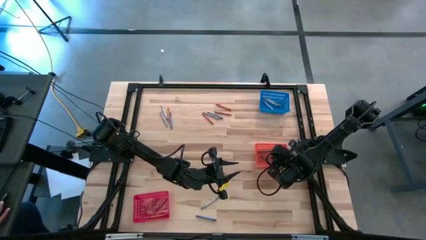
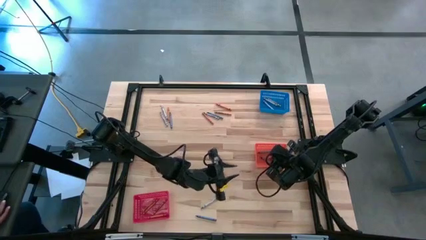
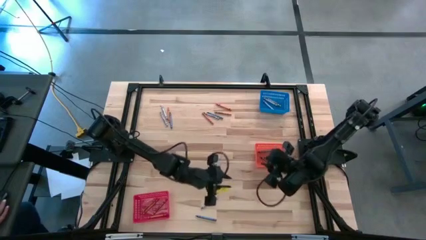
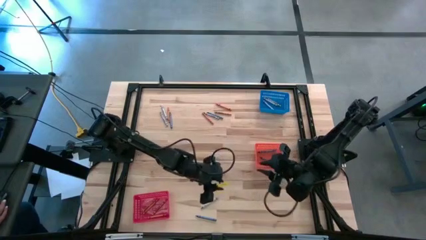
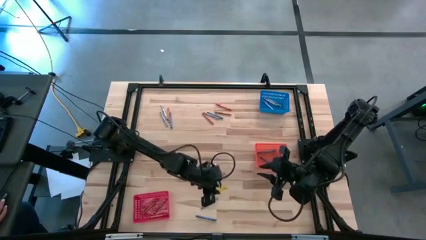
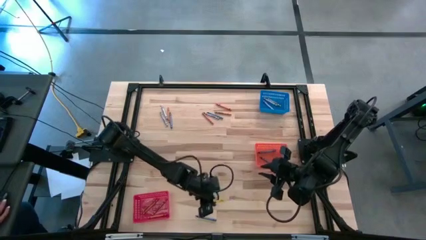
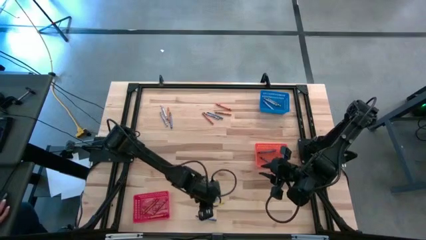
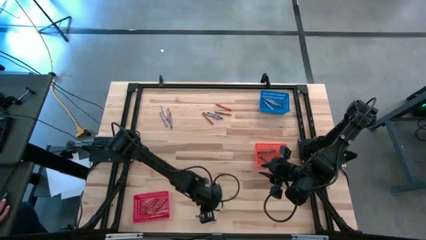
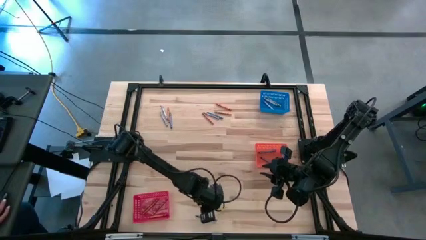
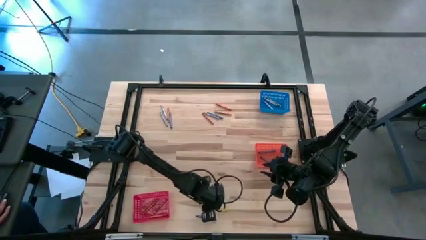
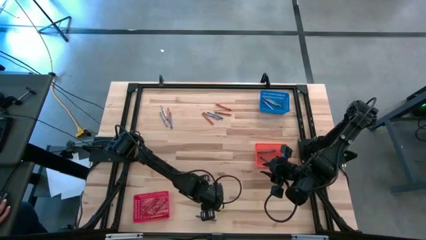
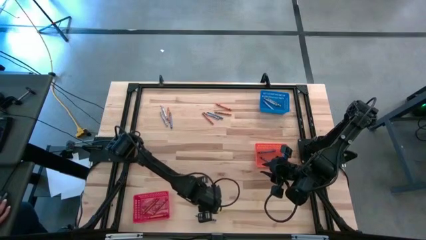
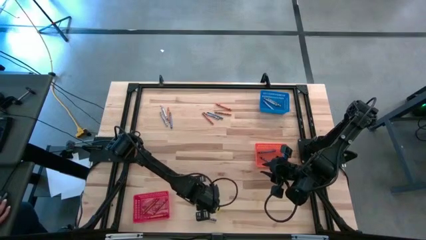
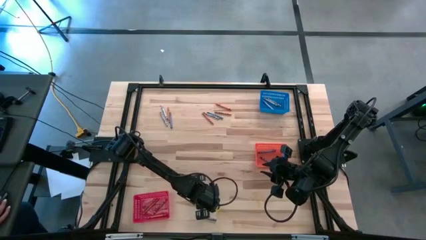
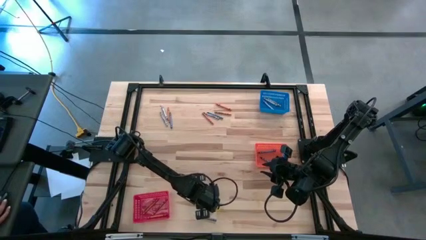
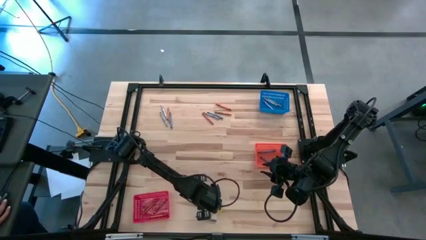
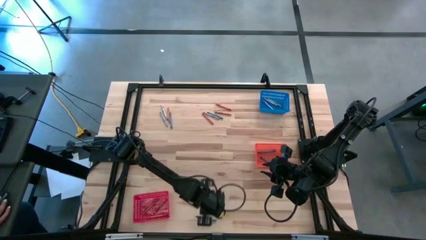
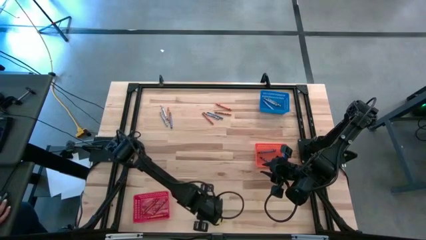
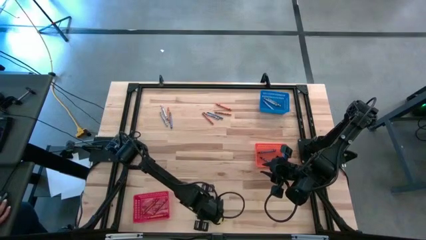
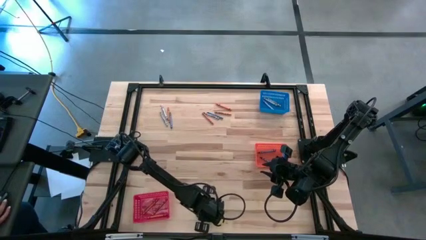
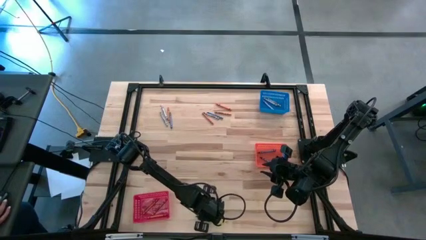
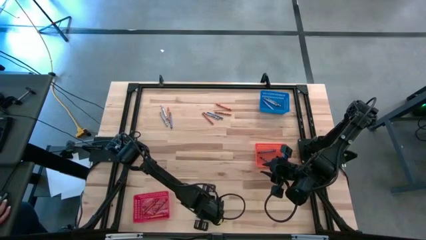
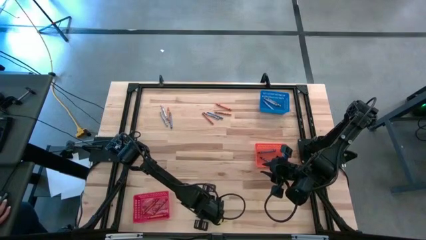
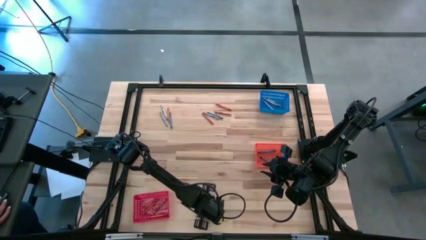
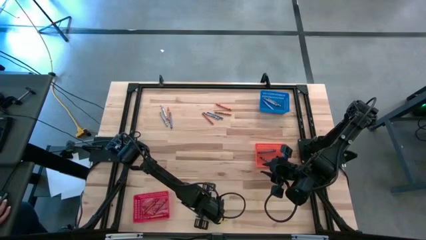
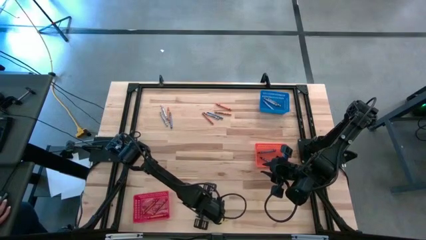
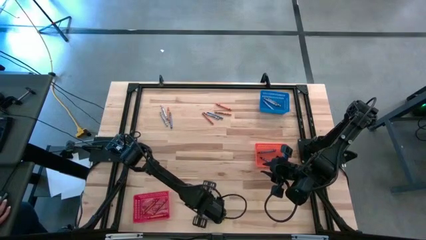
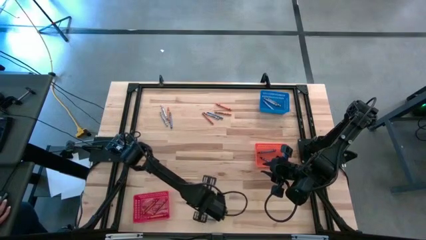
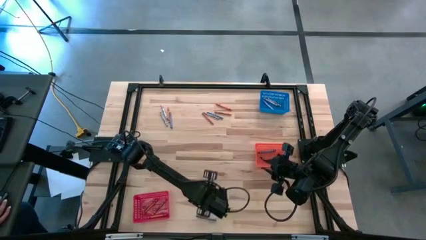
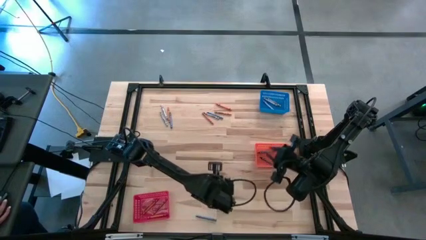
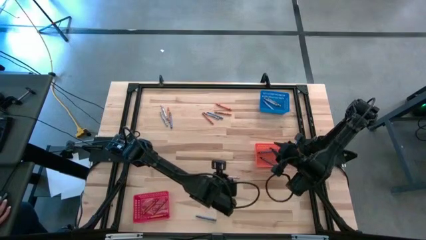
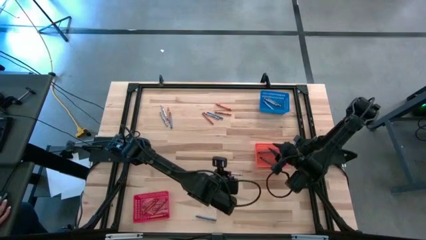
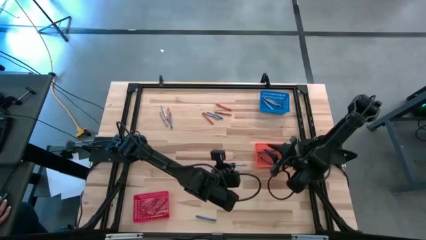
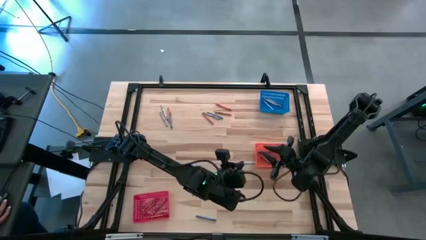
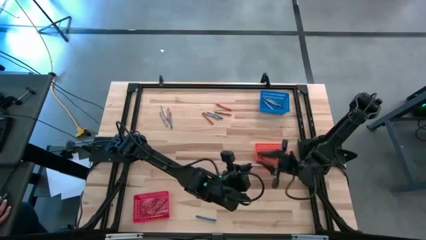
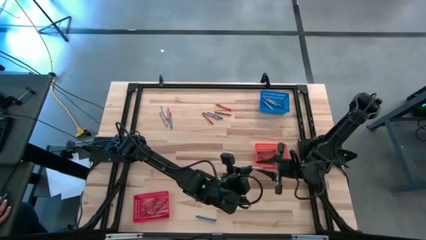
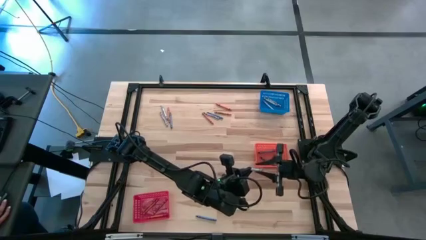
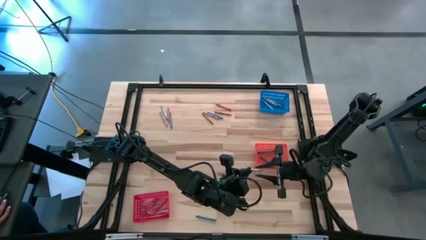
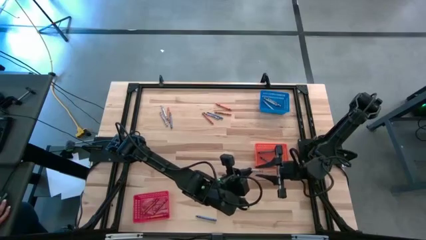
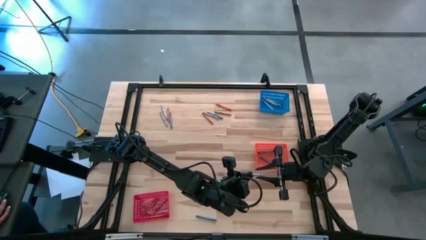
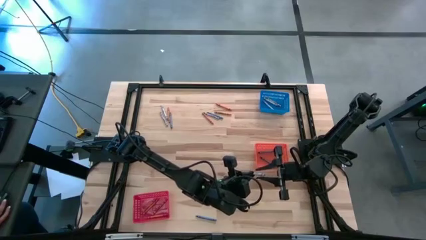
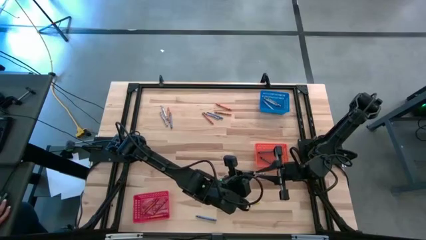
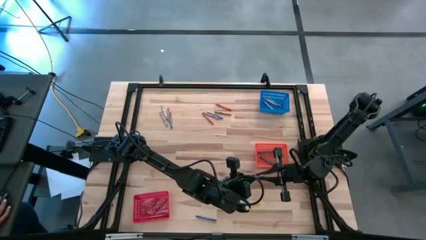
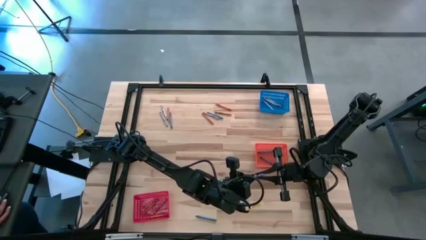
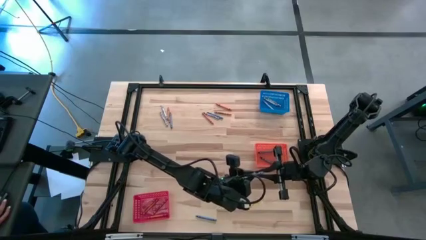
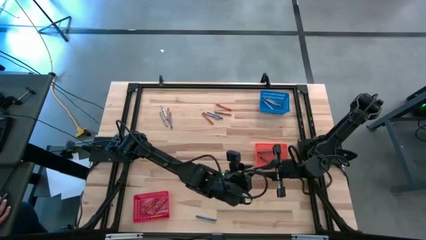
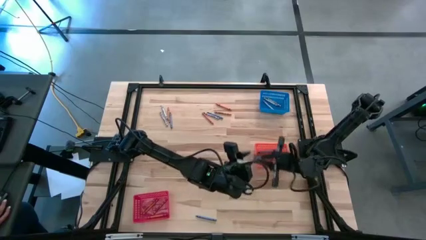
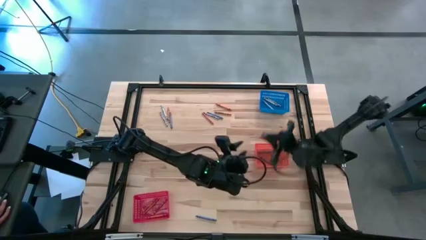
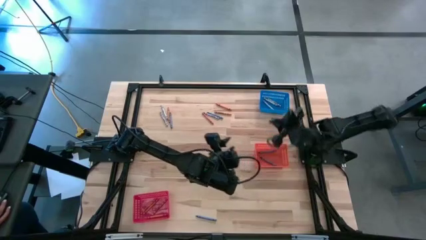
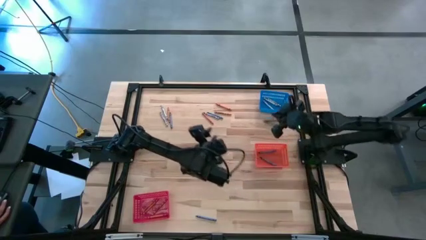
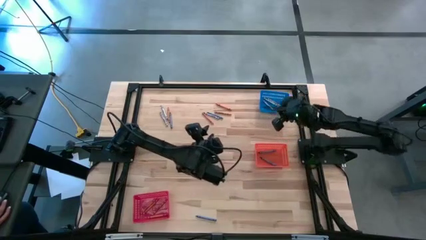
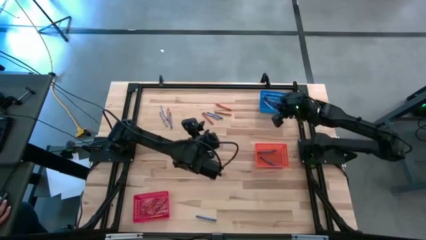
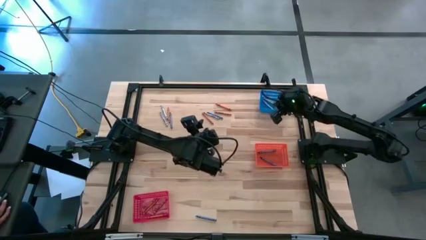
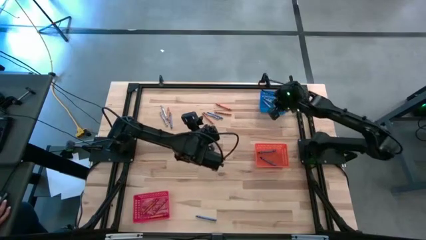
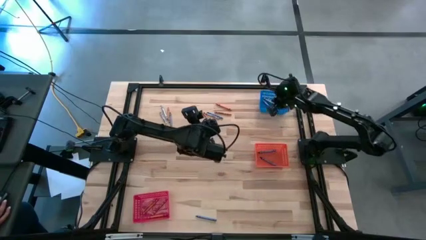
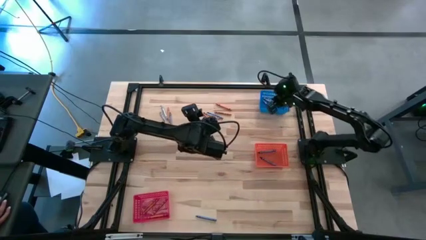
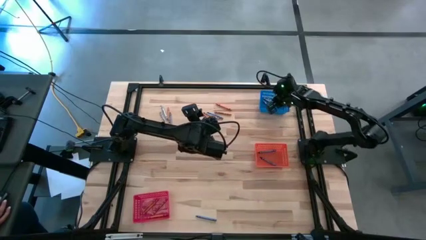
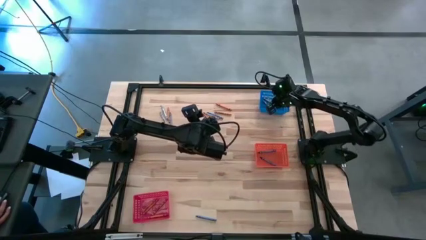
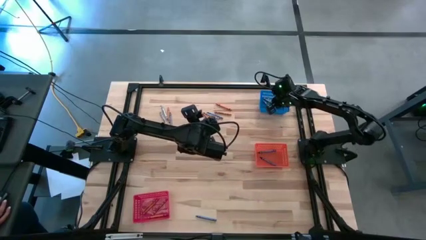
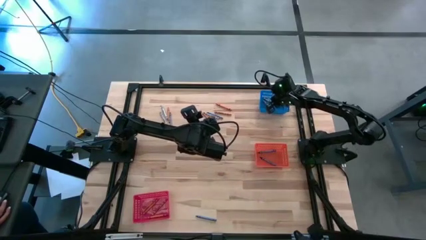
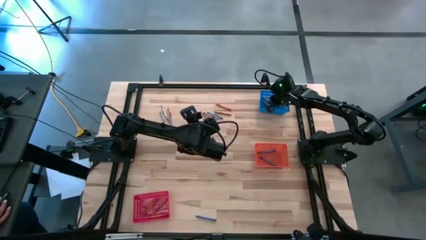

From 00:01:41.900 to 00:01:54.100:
Task: Sort crayons
Put the gray crayon into the blue bin

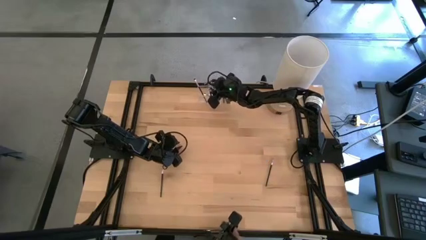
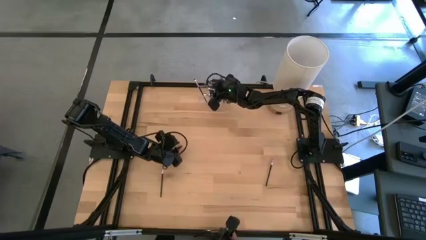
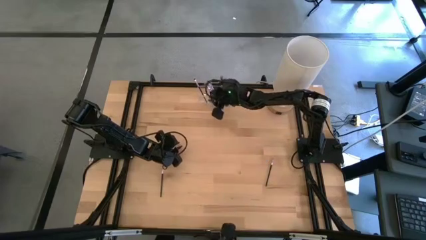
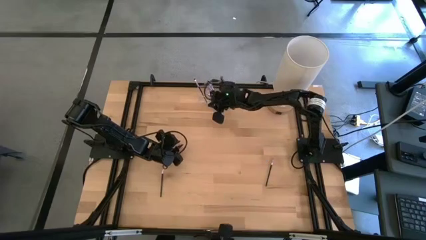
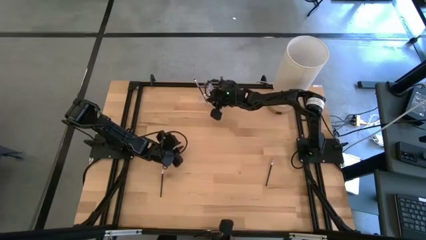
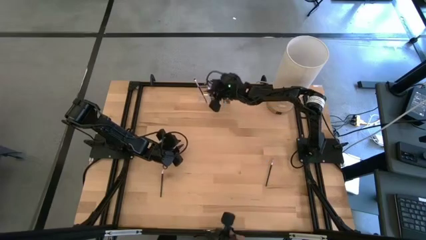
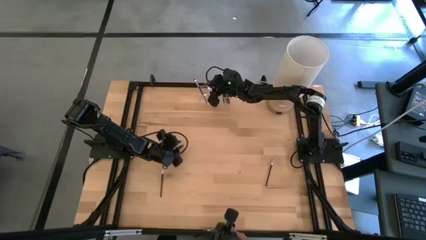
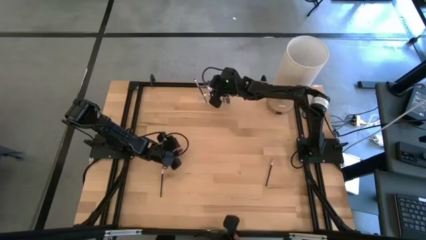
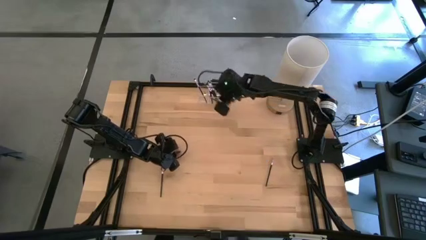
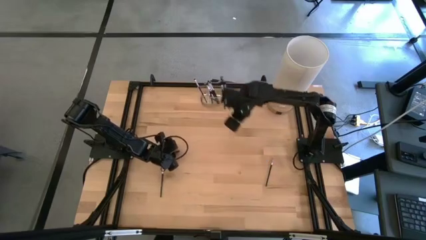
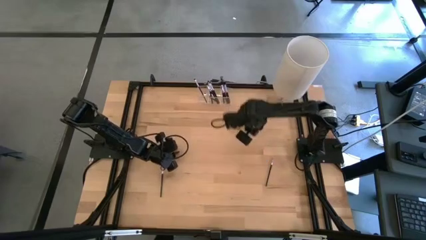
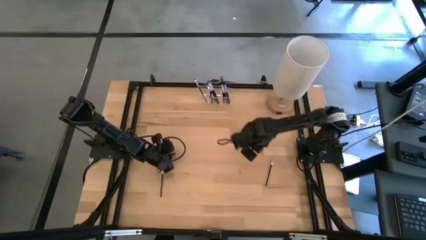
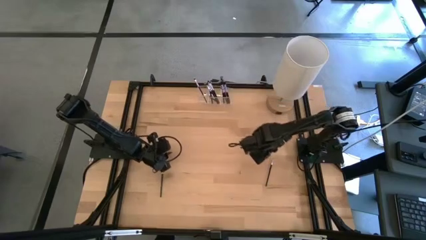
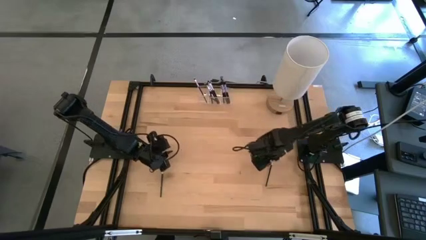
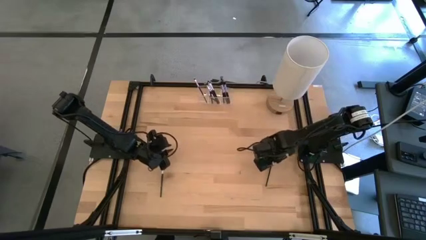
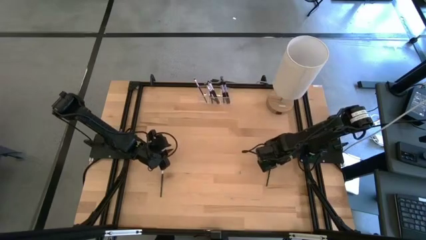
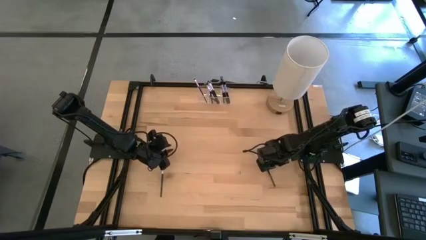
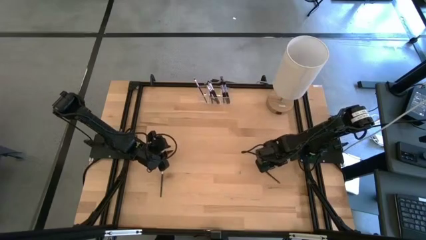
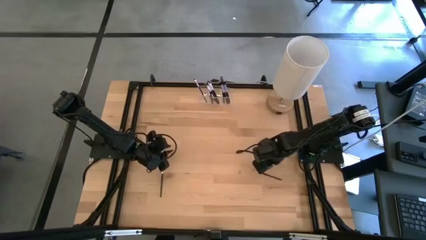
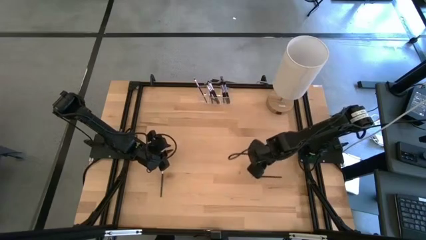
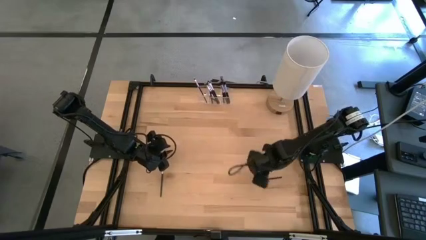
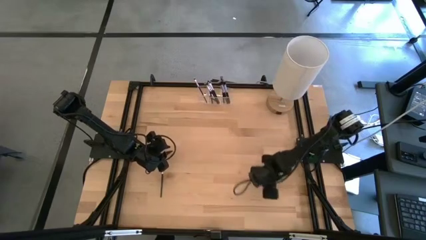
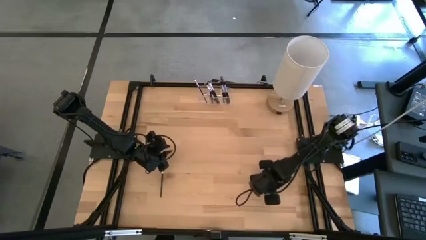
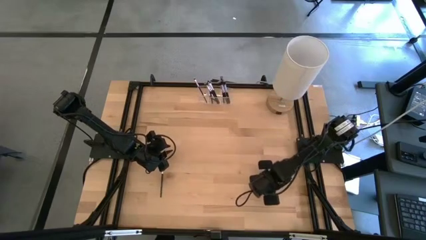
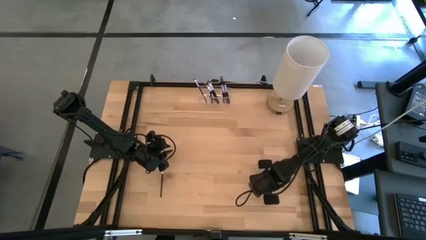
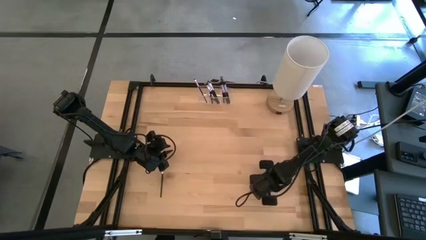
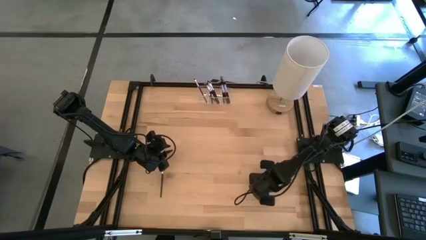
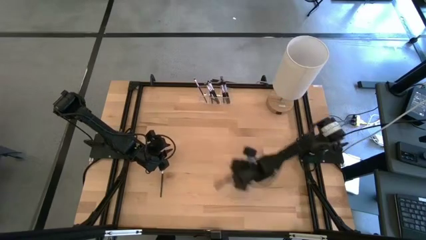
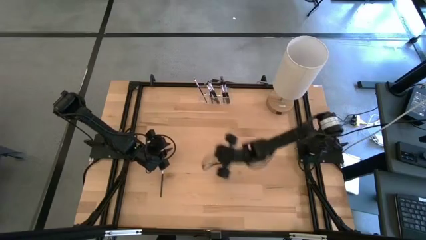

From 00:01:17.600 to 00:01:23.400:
Task: Put items in baskets/containers
Put the black eyeshadow brush into the transparent organizer
